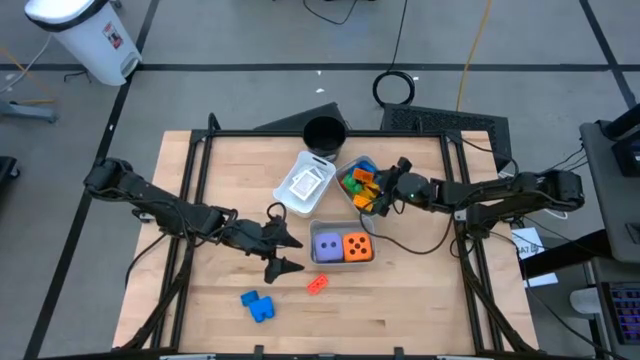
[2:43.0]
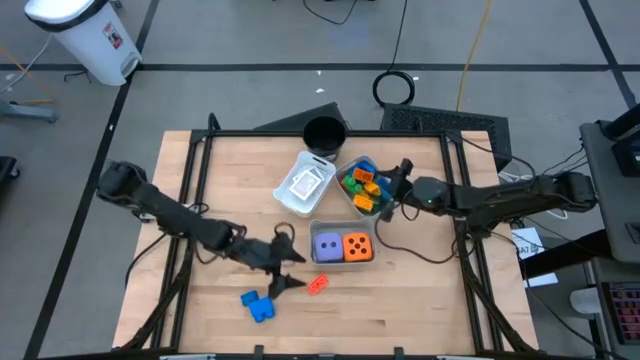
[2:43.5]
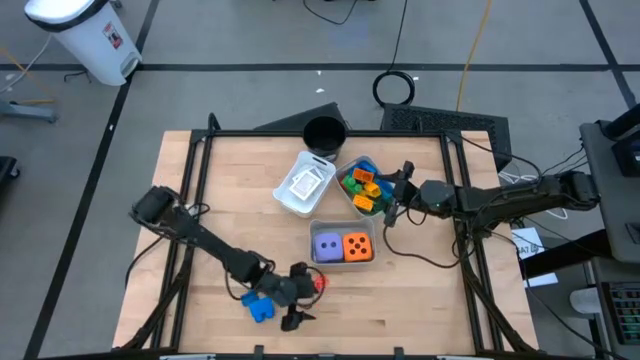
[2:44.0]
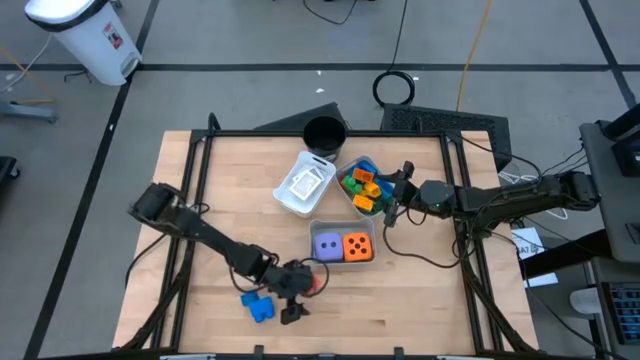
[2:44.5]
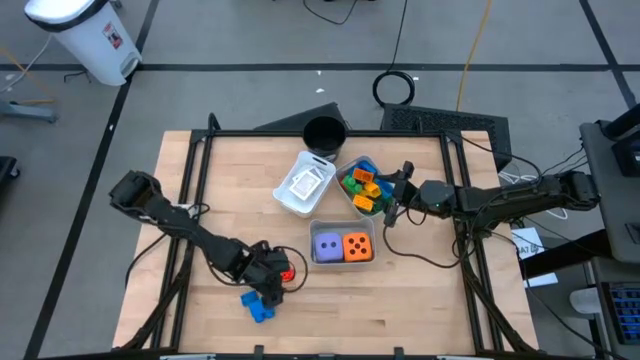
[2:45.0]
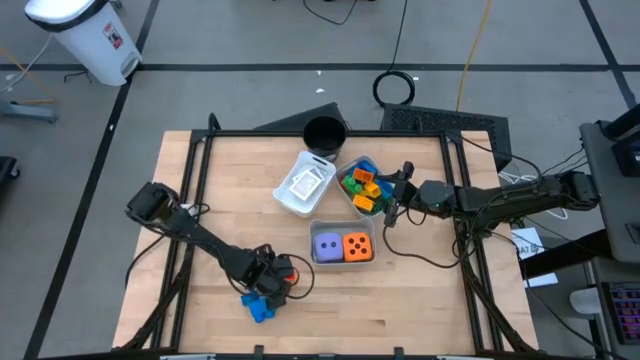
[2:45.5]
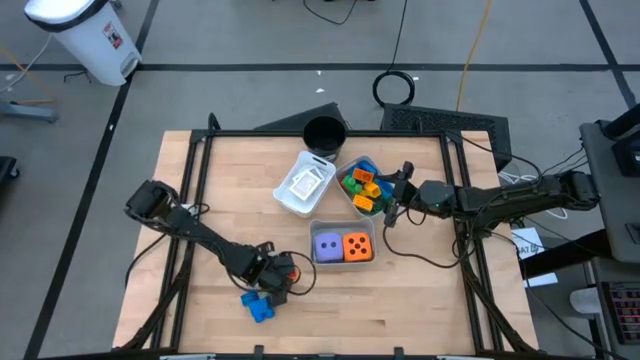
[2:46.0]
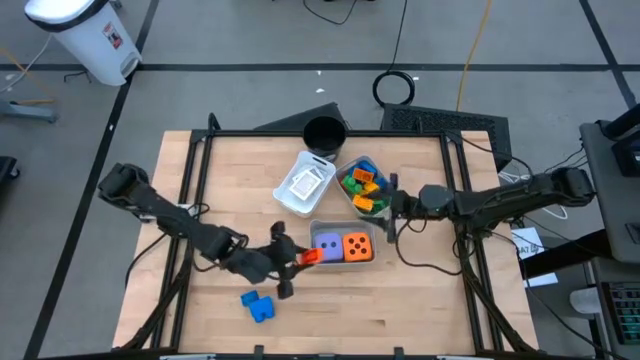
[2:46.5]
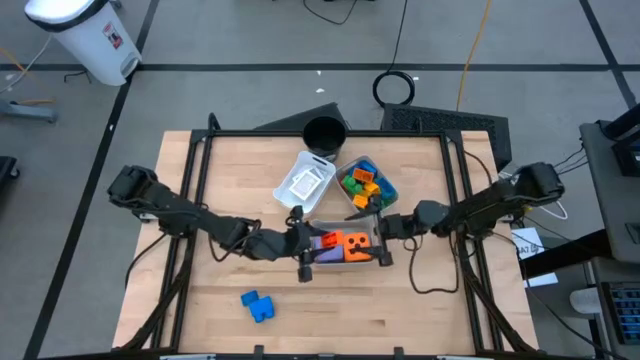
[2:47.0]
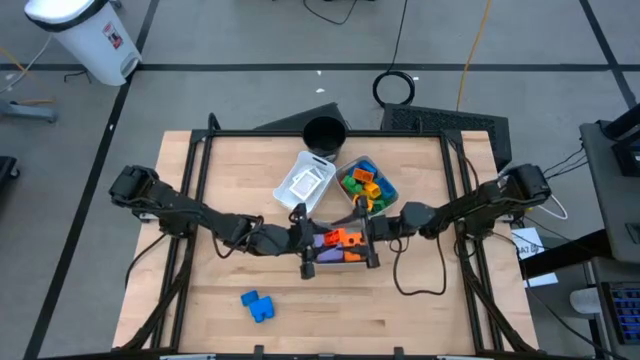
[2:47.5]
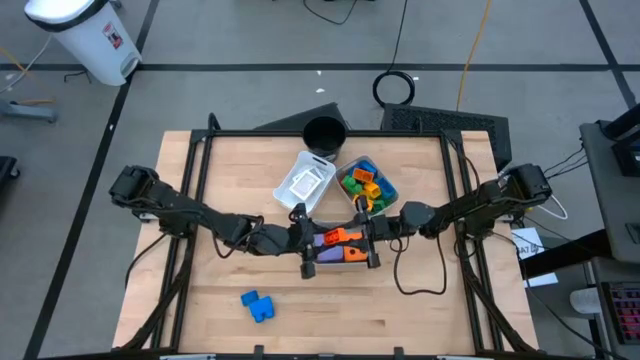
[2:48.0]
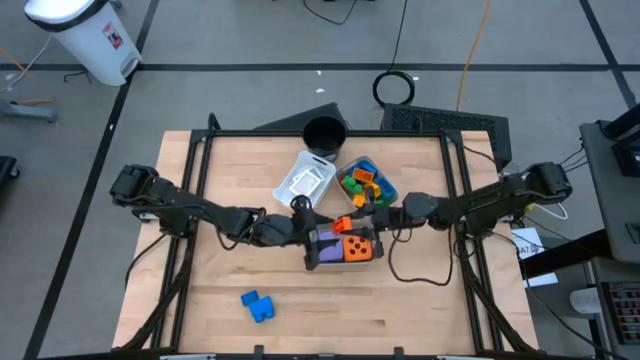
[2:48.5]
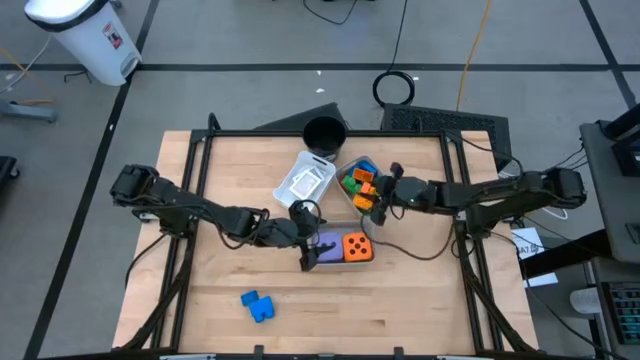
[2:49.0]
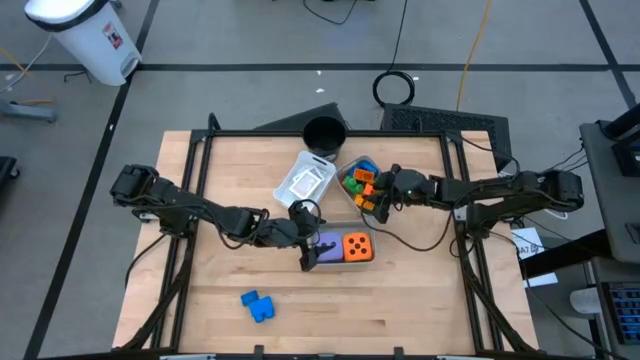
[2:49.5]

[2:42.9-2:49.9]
Task: Pick & Place Toys
Put the orange game piece into the top gray bin

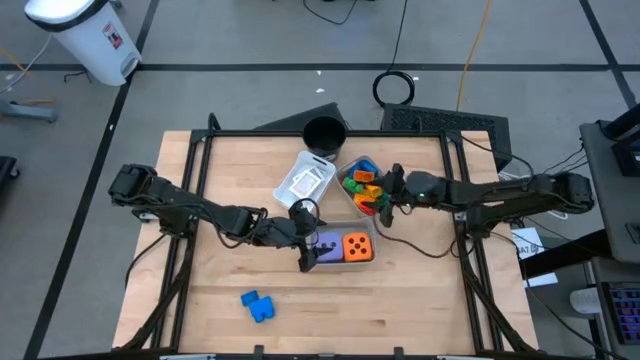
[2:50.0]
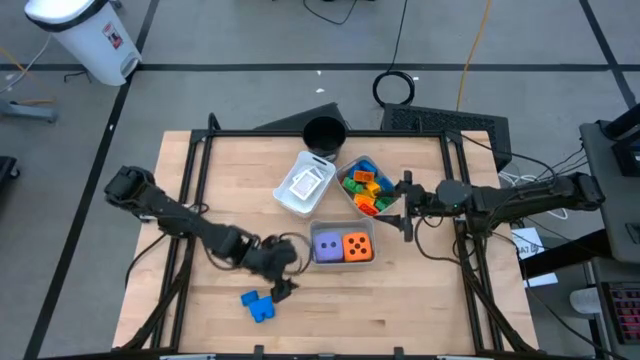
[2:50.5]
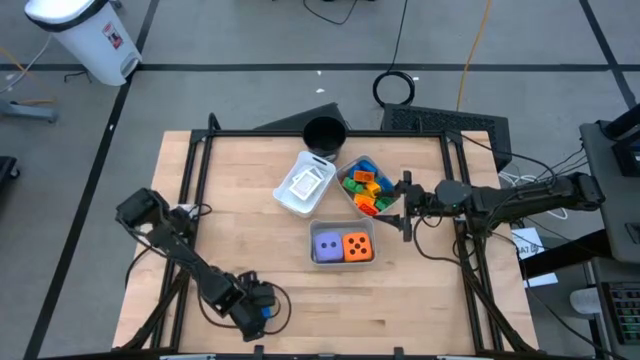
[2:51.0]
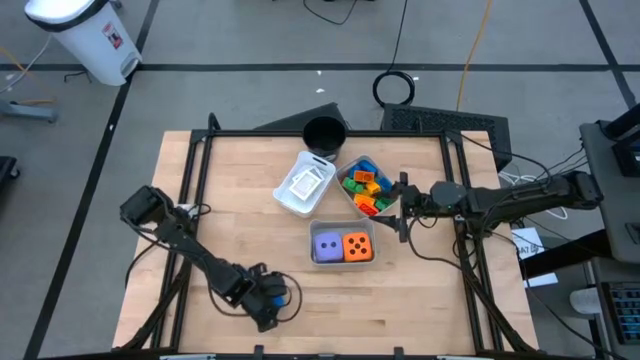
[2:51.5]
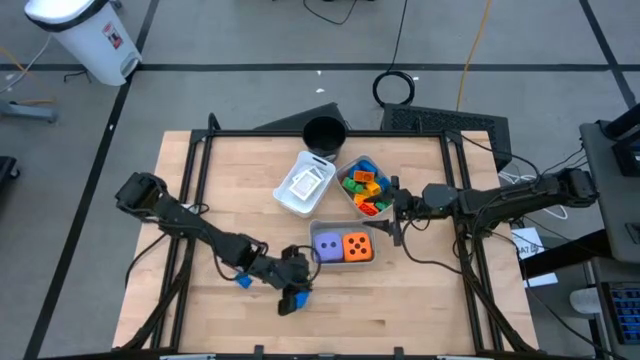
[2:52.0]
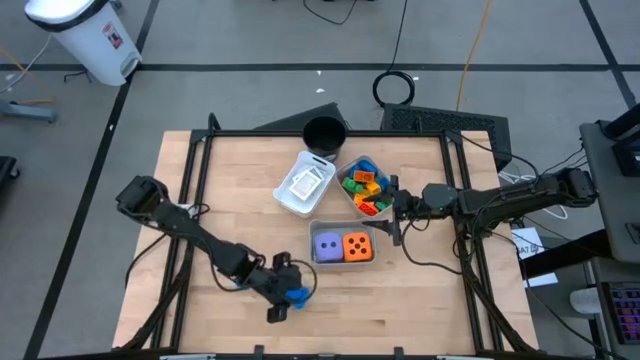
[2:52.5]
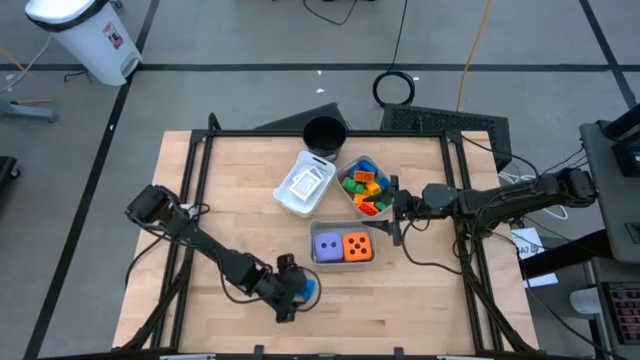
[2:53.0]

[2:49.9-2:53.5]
Put the blue game piece into the top gray bin

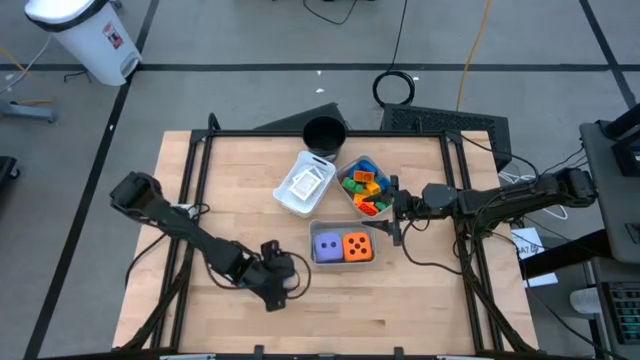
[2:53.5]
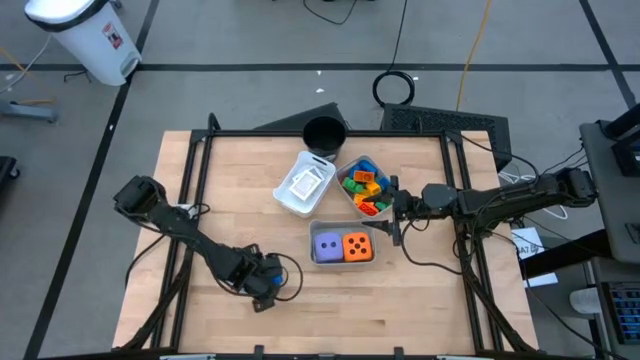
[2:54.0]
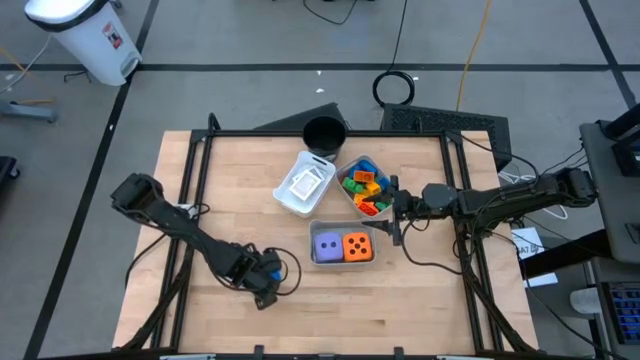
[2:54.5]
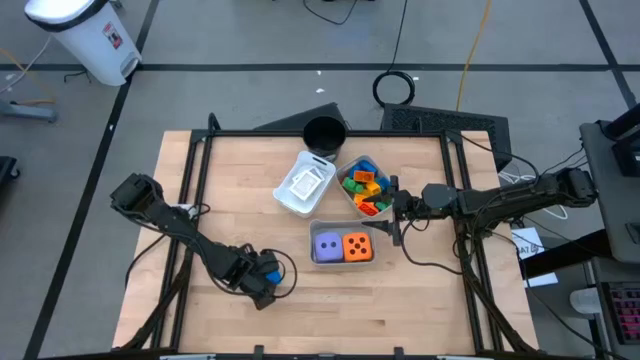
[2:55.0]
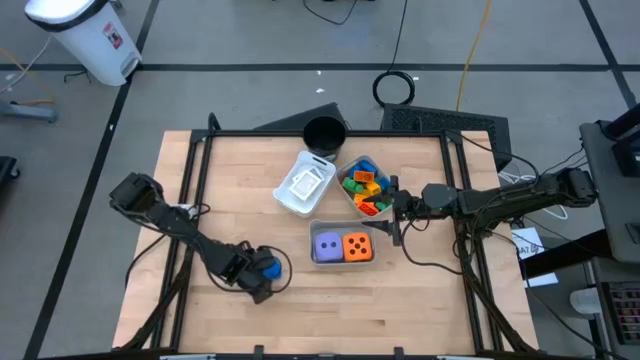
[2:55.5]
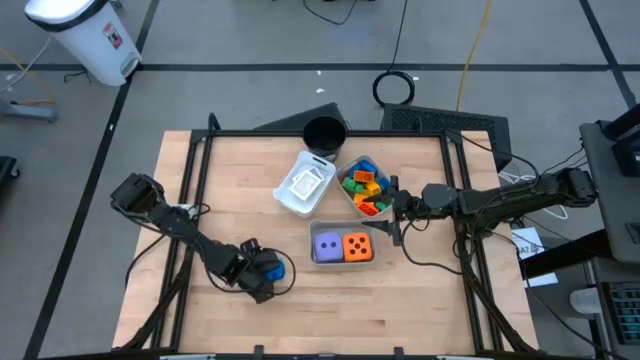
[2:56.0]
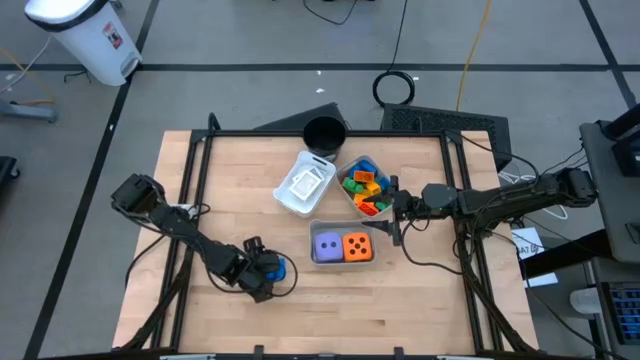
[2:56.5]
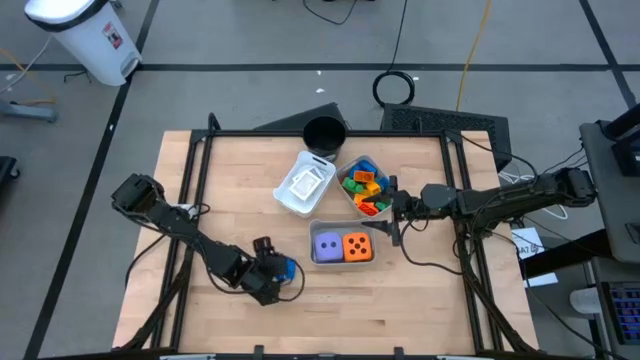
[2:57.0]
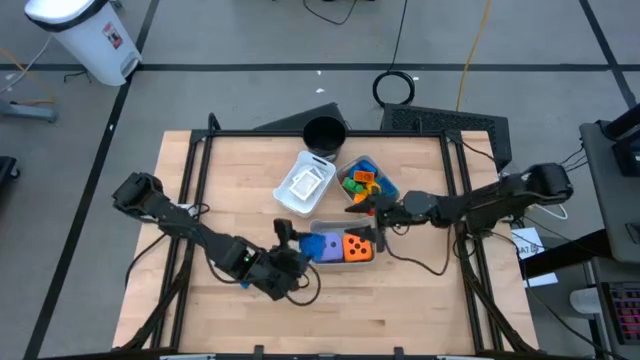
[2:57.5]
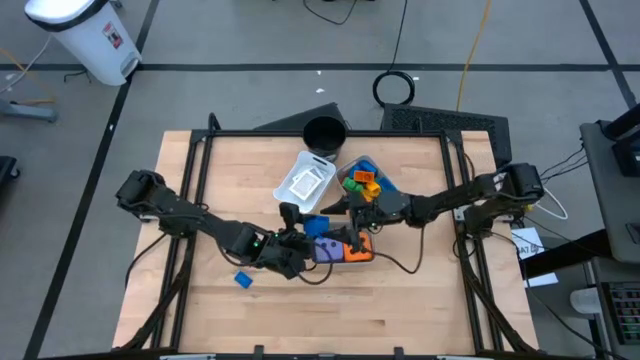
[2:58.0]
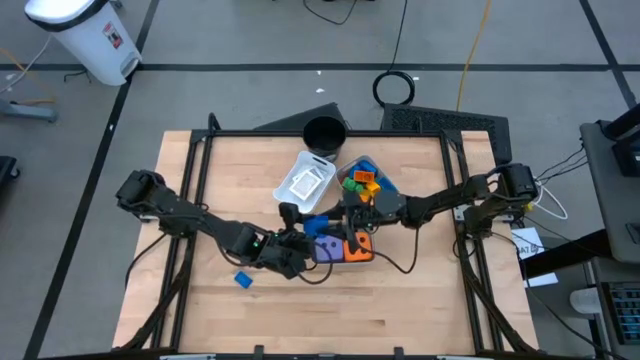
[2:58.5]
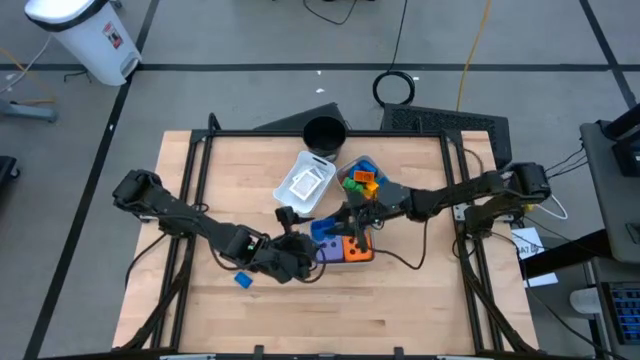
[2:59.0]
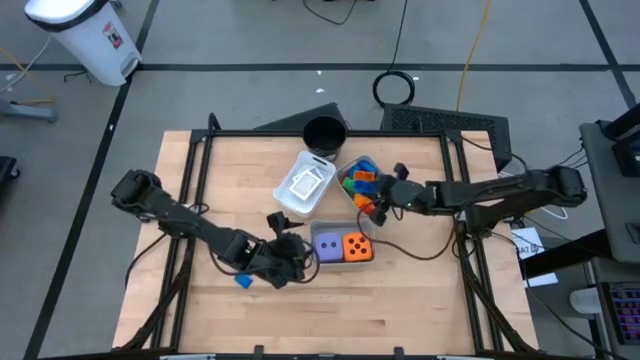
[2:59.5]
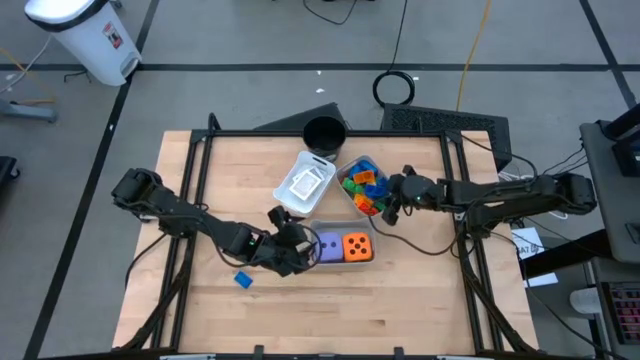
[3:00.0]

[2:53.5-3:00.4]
Put the blue game piece into the top gray bin

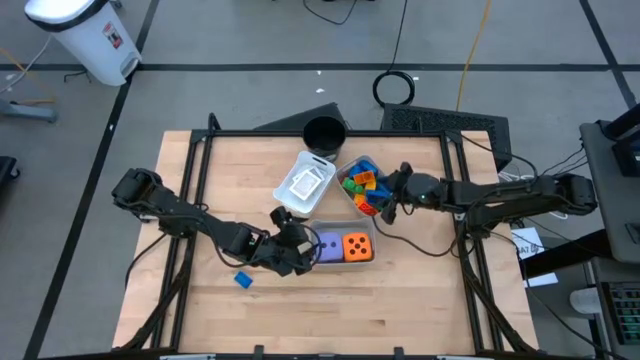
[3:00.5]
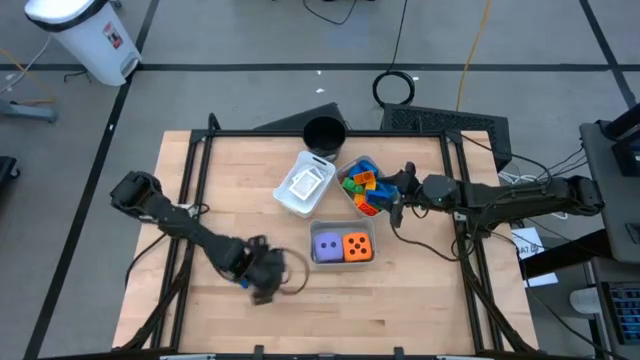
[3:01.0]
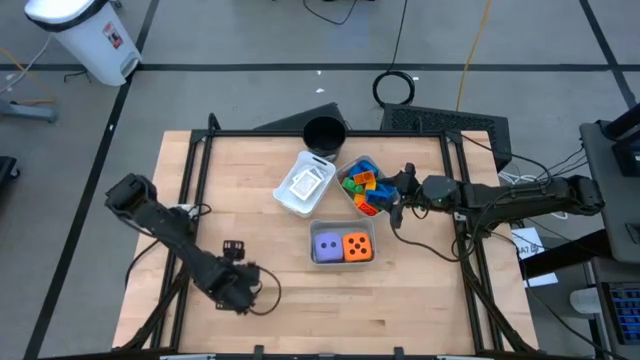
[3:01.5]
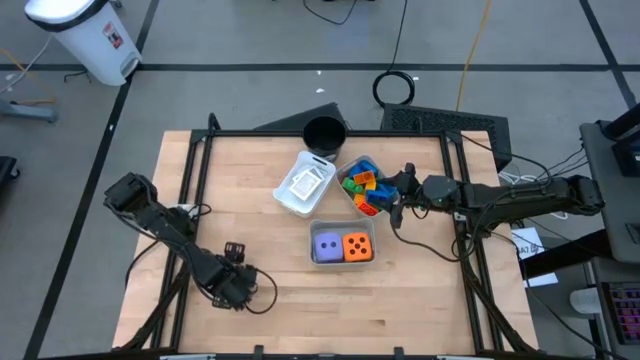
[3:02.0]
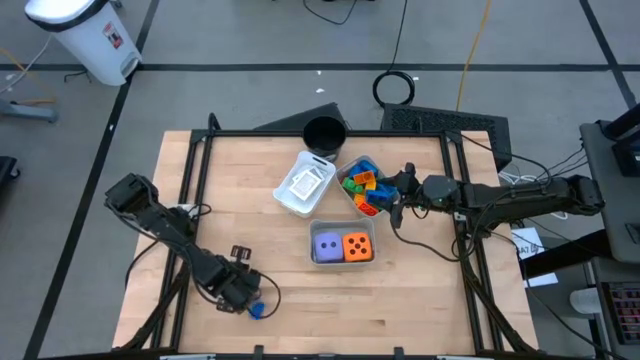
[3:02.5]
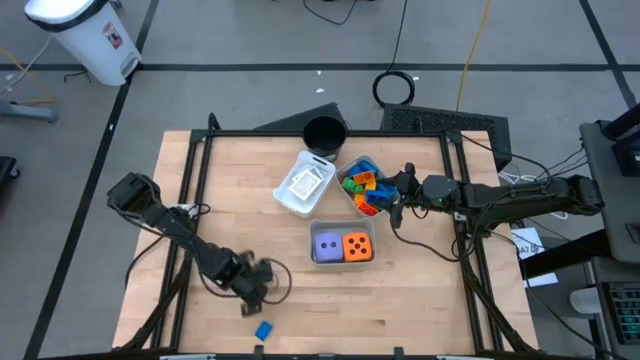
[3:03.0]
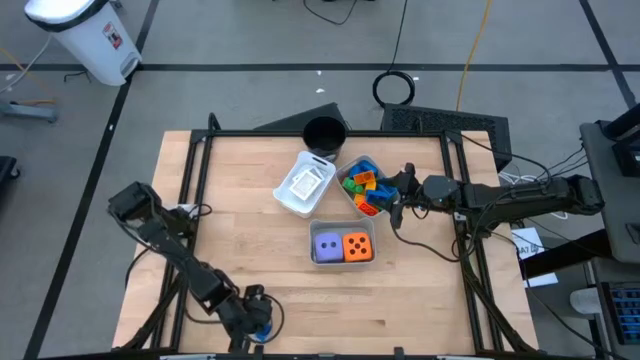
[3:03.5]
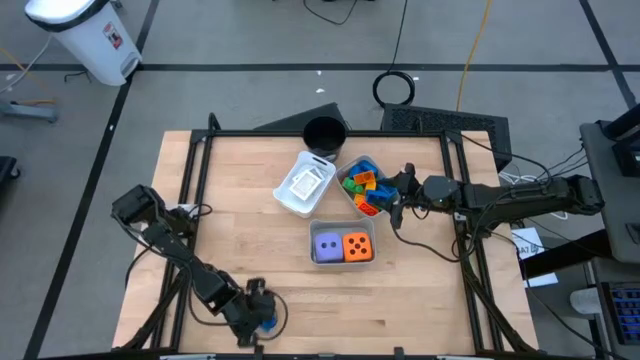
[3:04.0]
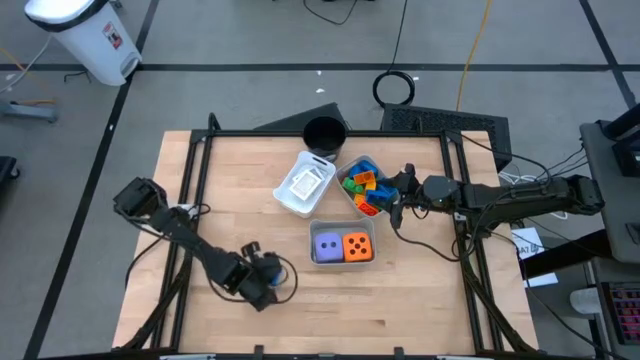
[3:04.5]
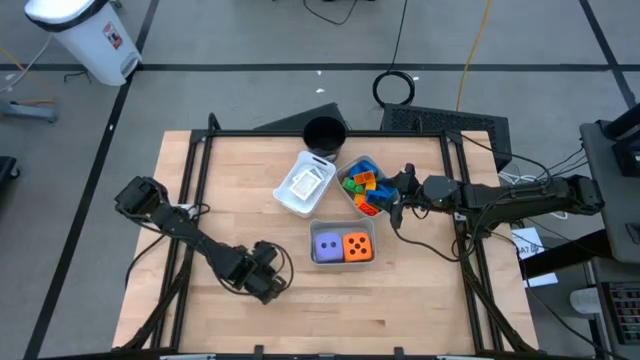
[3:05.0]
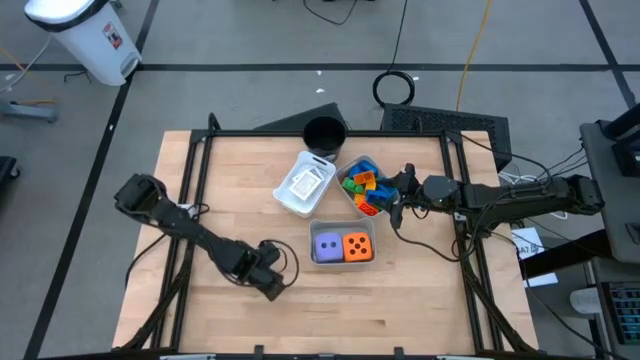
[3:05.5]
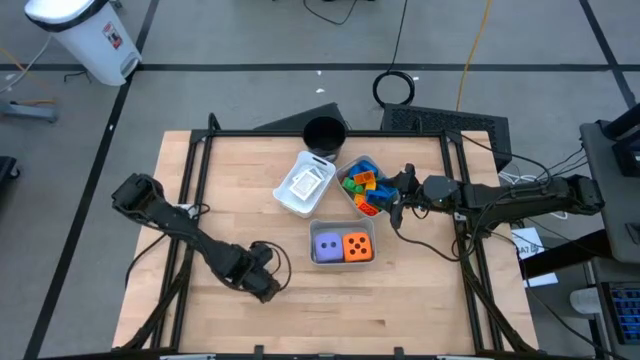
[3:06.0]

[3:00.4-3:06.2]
Put the blue game piece into the top gray bin
